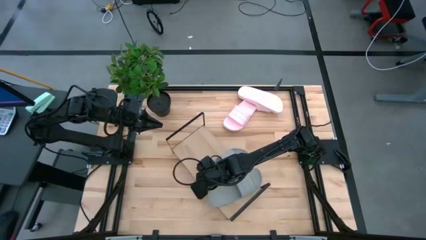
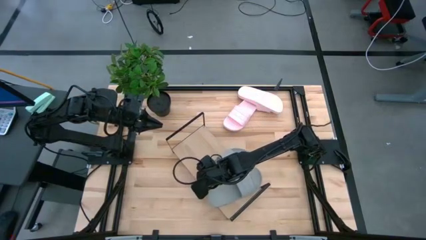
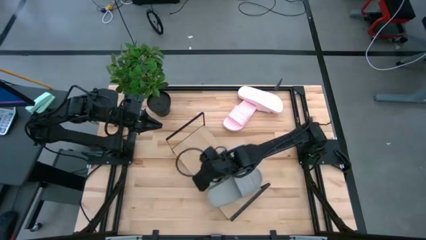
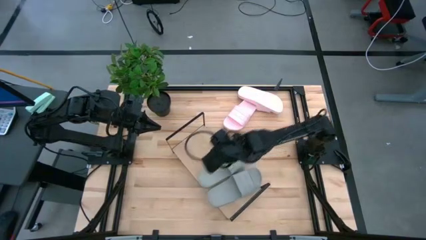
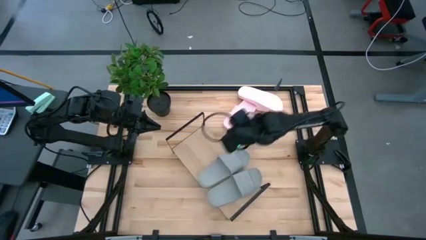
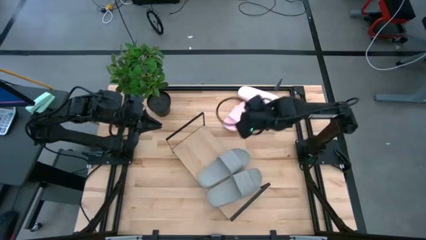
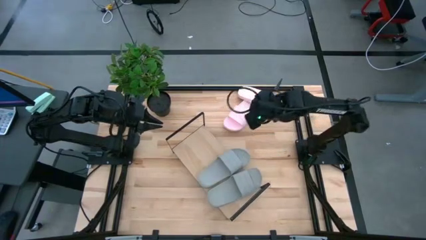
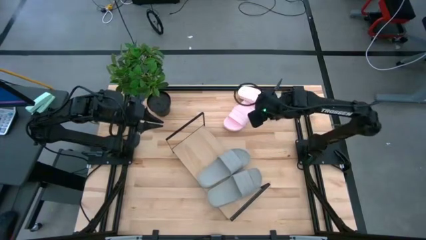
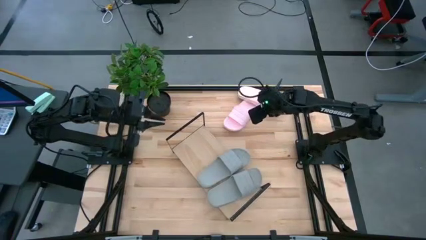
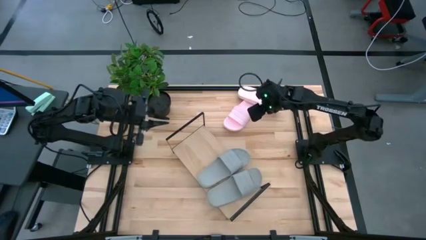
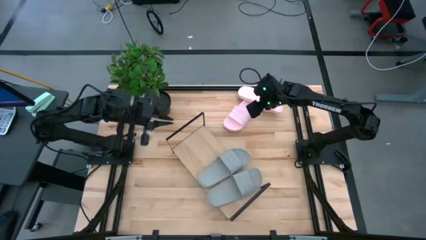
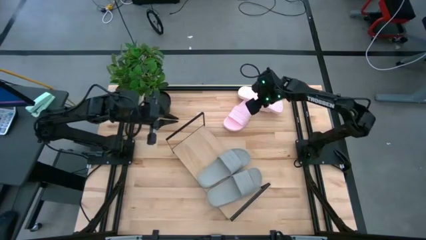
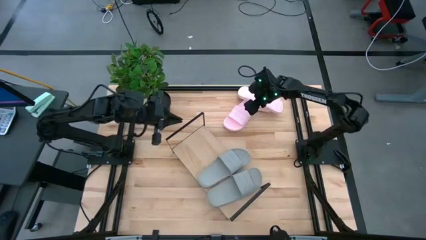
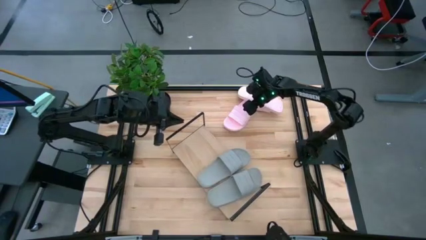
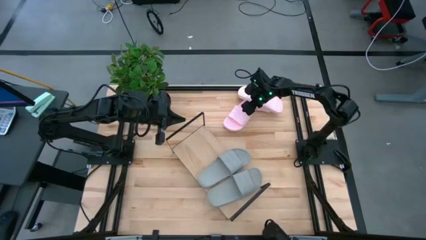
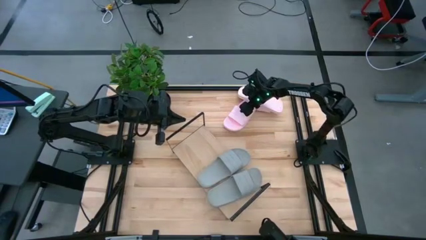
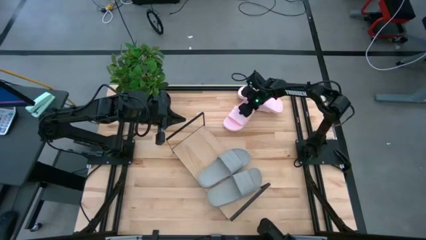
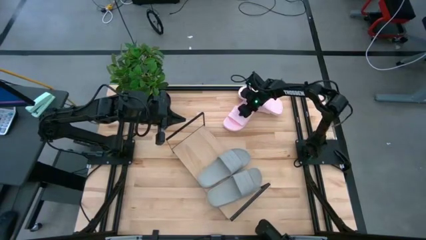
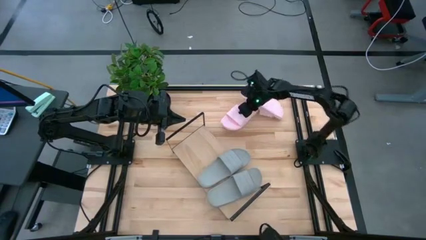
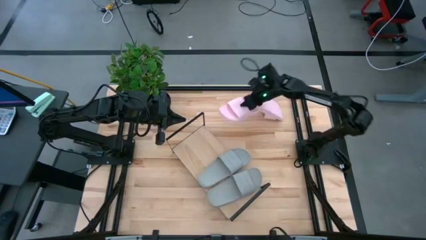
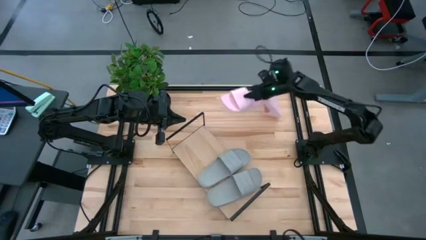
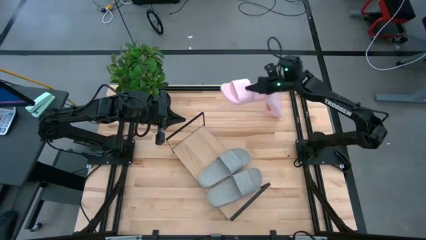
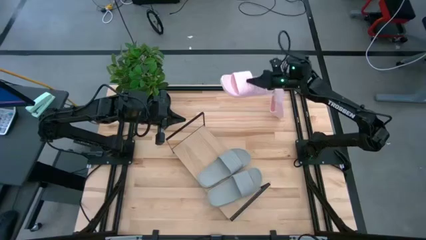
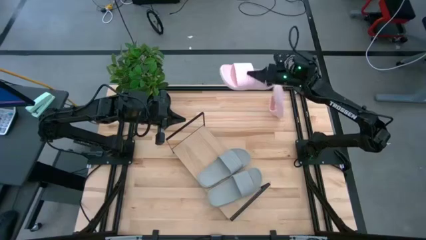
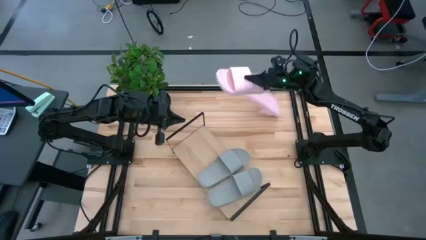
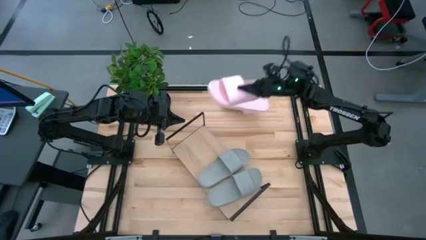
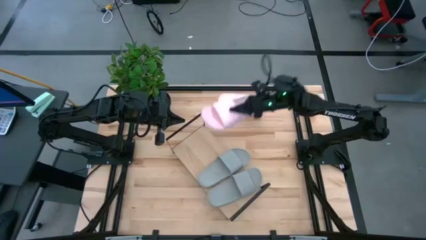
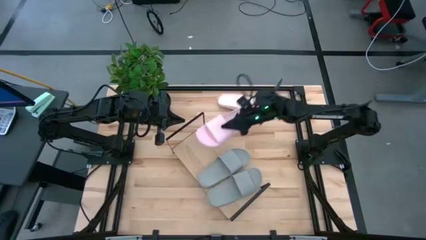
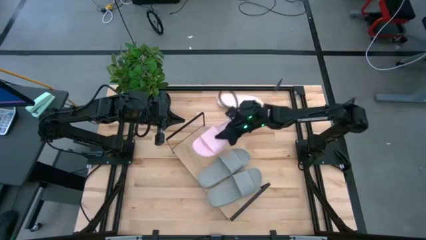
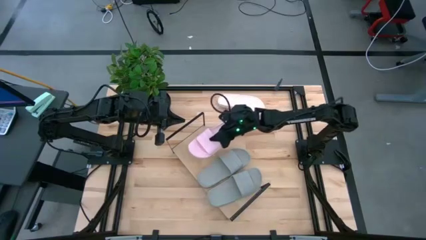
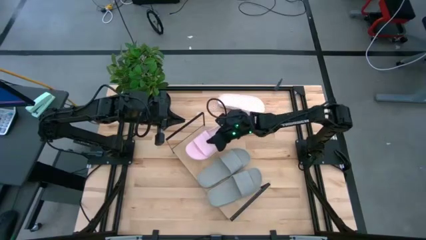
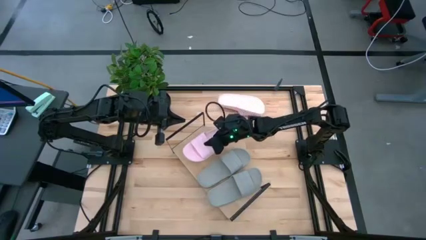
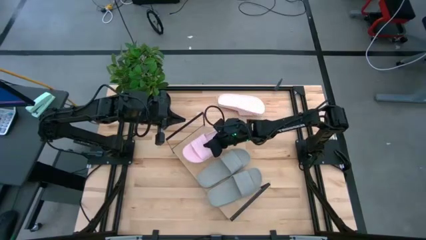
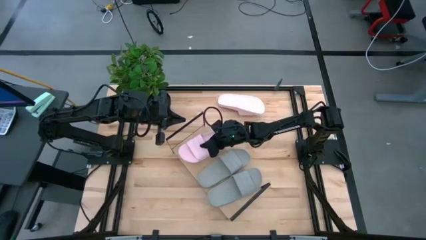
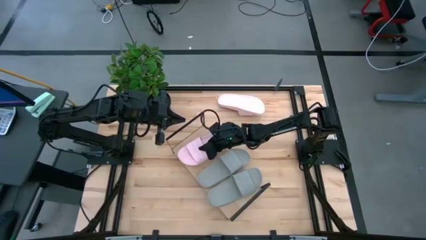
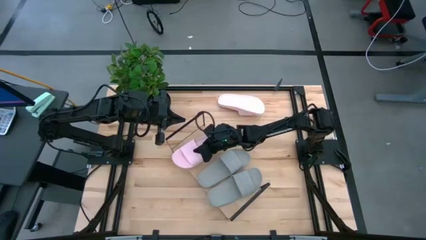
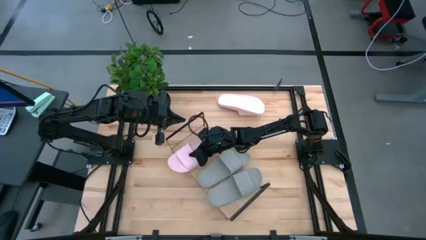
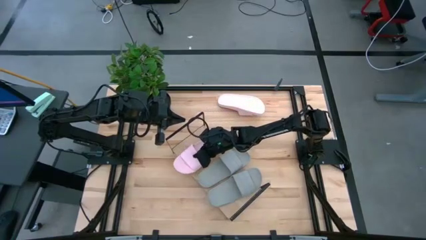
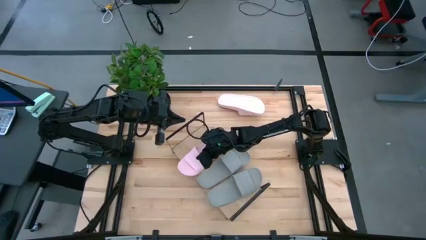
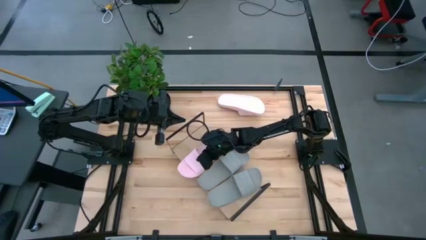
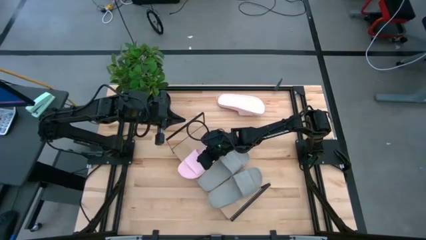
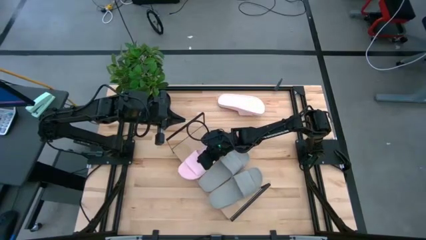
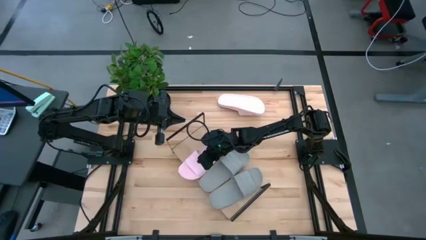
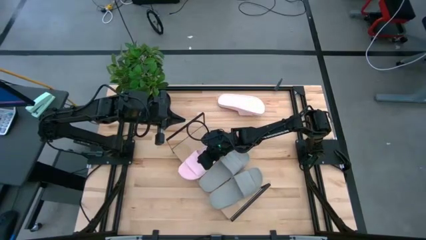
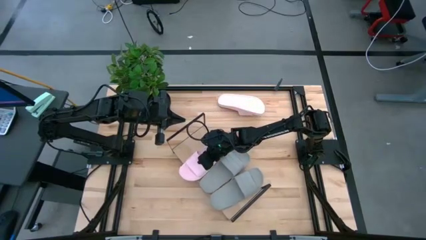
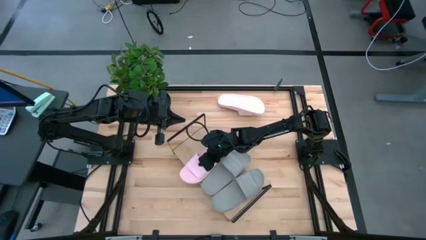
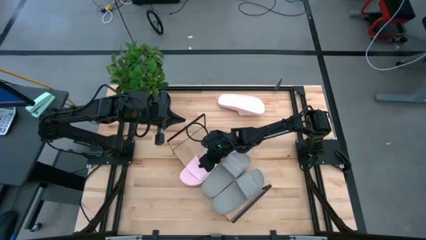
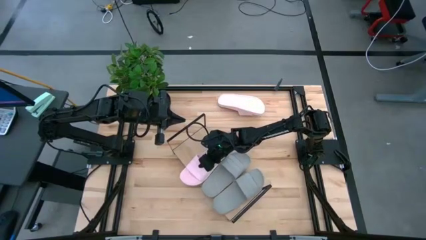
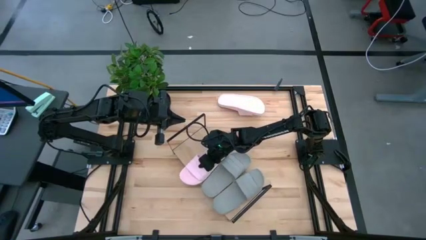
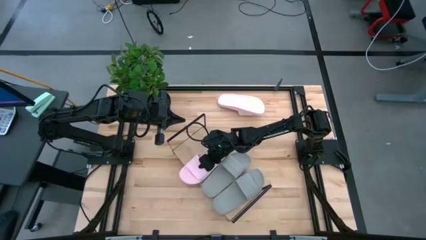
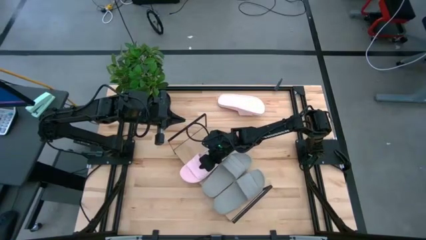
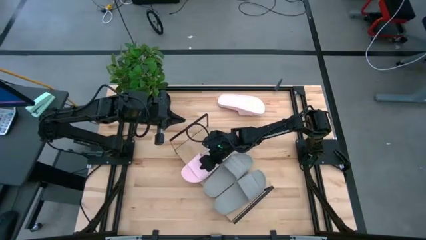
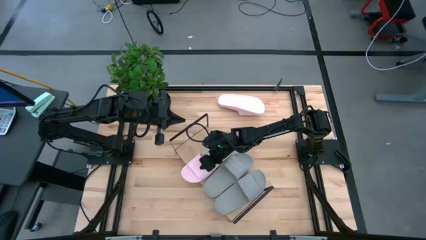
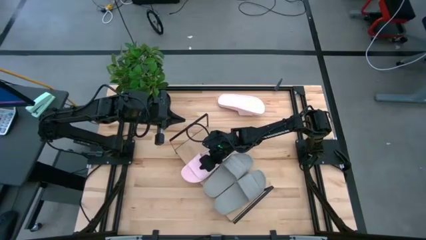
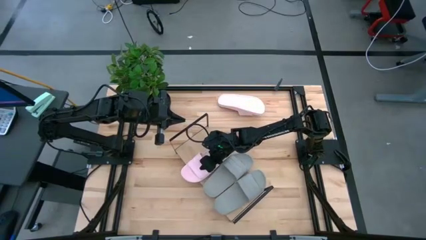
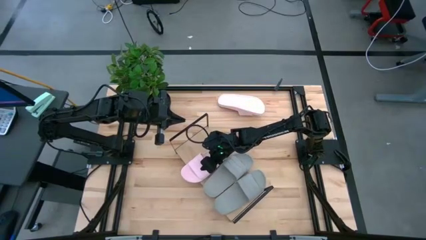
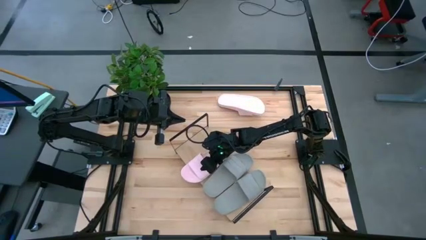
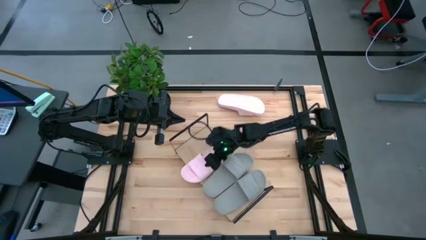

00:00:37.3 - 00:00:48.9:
Task: Pick and place slides into the shelf
Put the left pink slide on the shelf

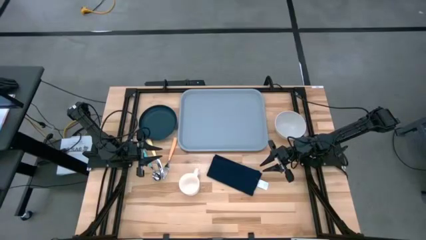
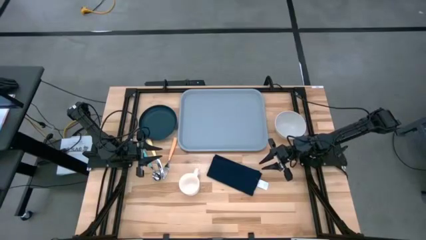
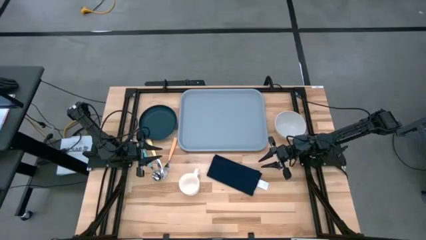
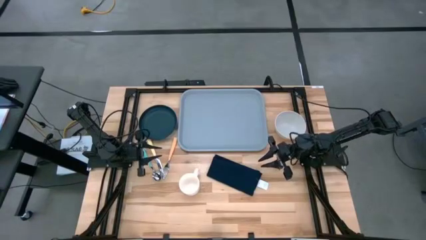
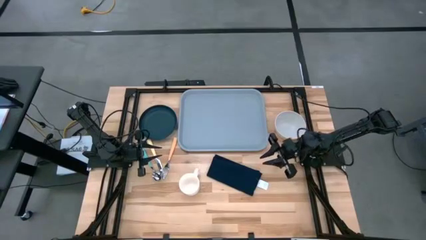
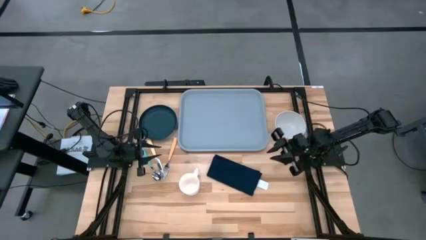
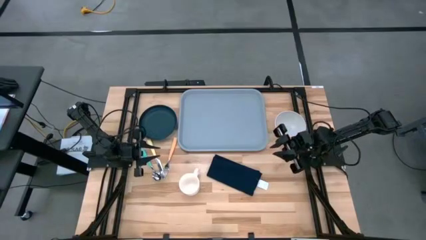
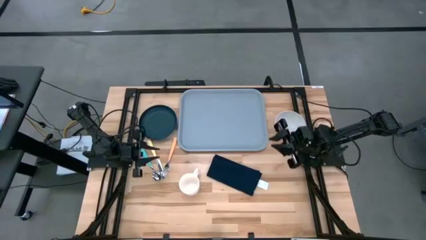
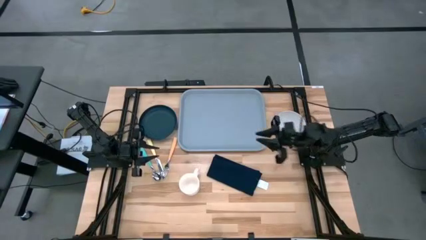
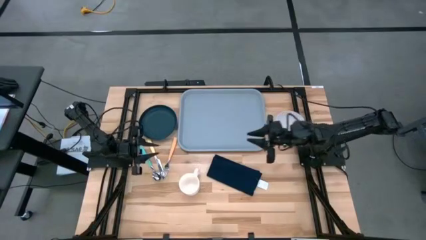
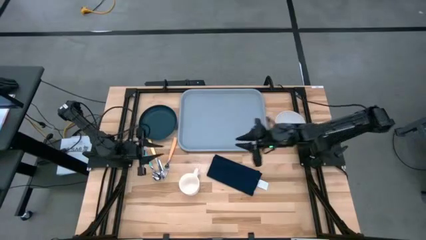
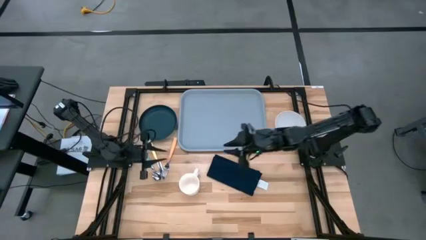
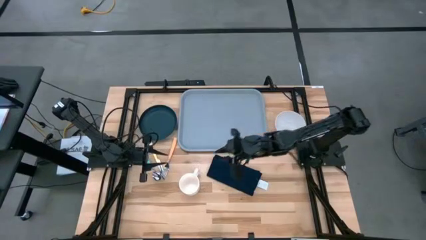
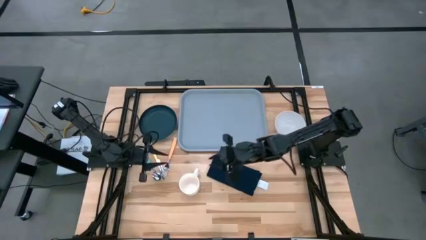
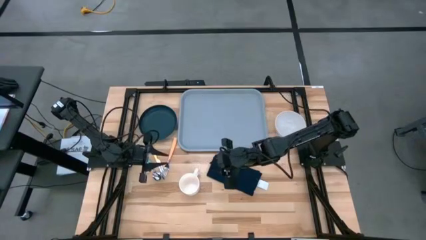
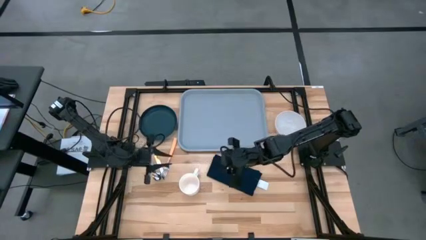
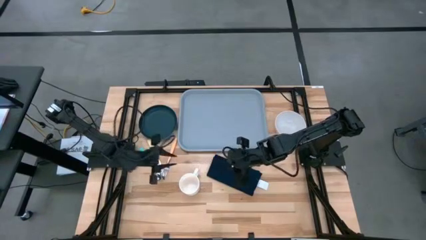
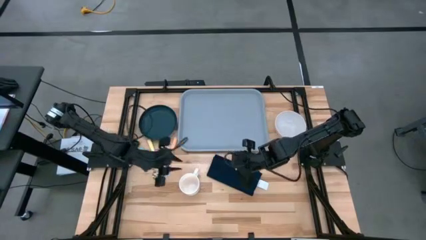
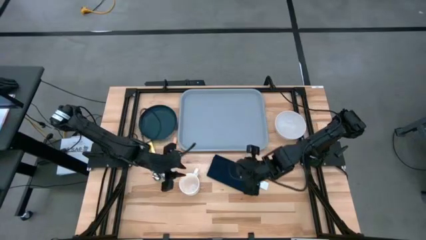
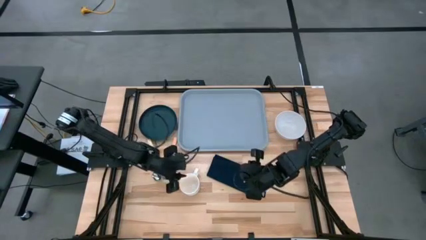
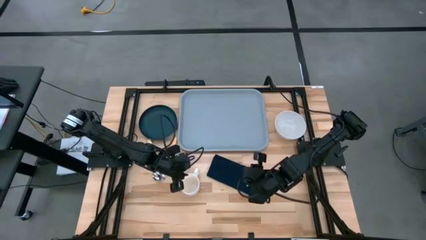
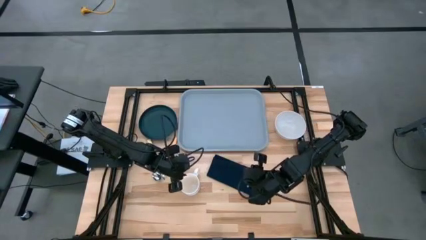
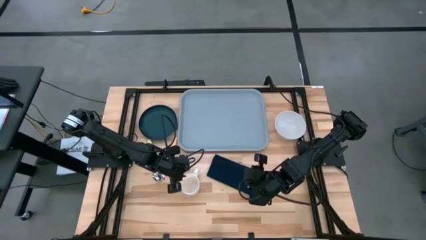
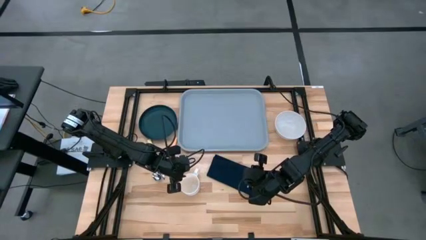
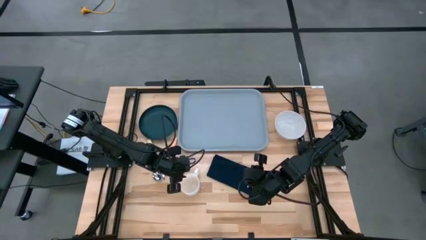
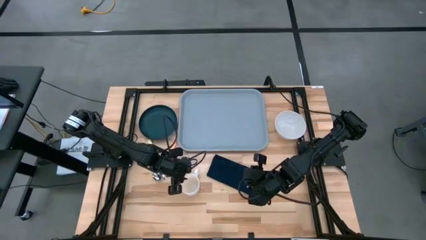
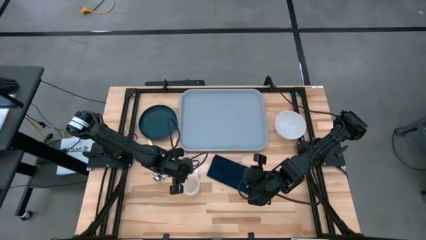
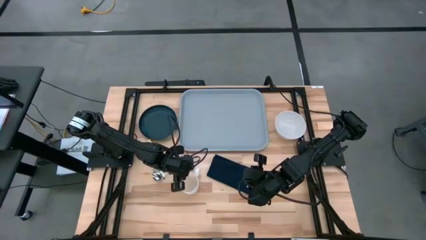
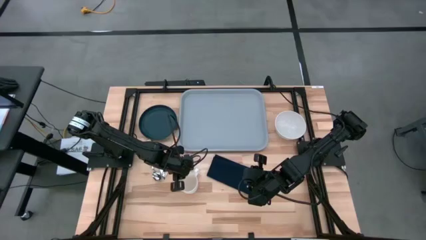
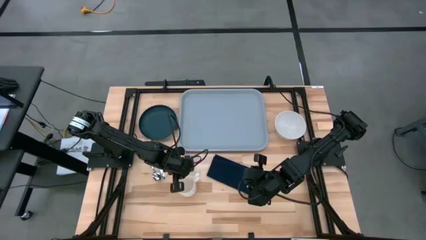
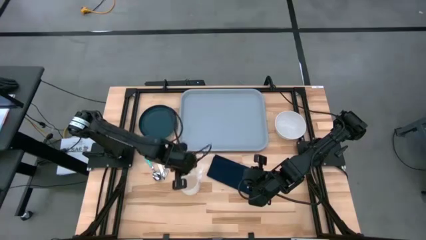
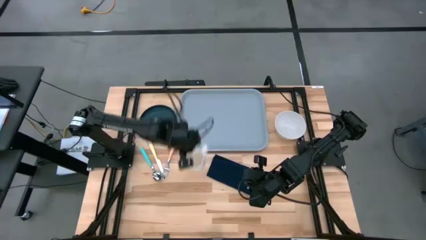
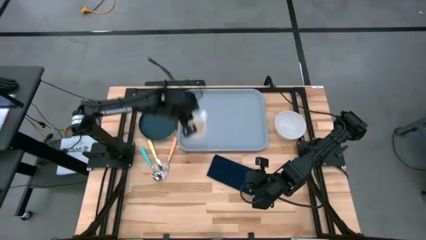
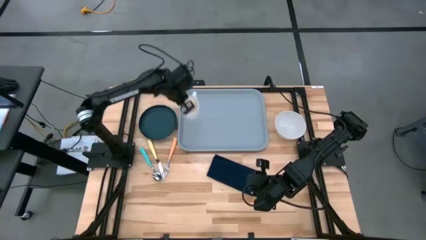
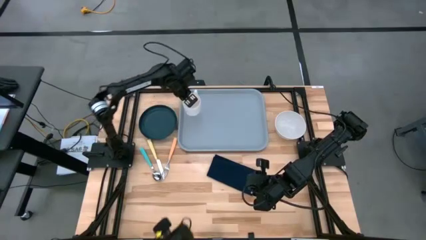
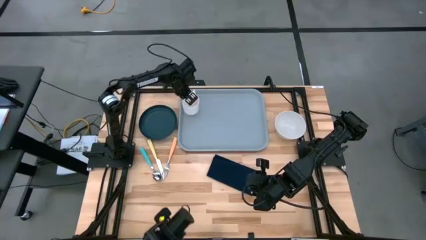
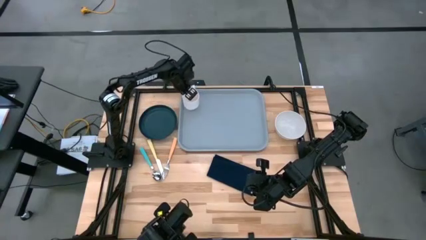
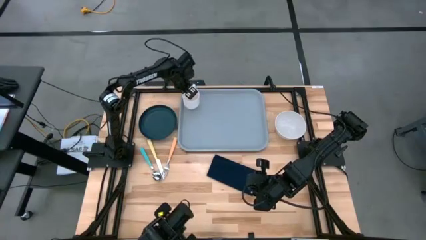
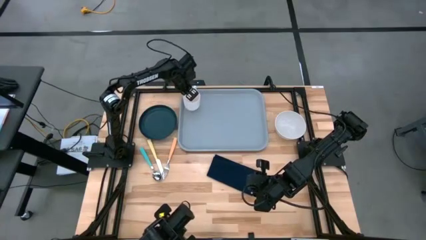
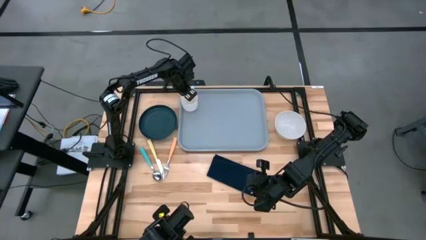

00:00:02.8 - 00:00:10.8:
Task: Set up tray
Put the white mug on the gray table tray
